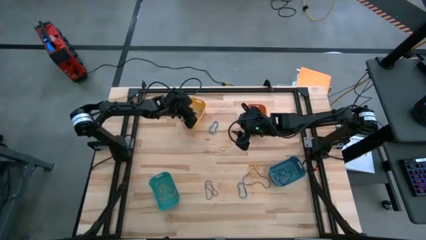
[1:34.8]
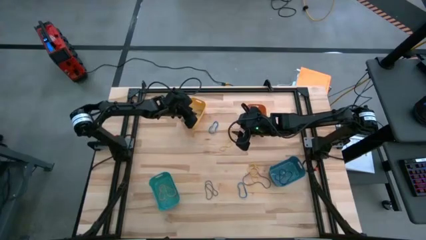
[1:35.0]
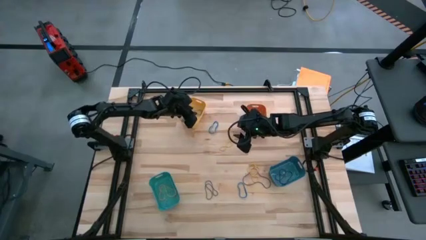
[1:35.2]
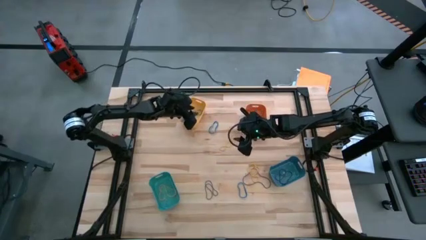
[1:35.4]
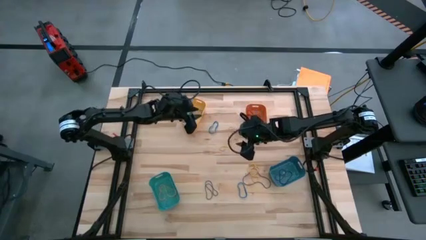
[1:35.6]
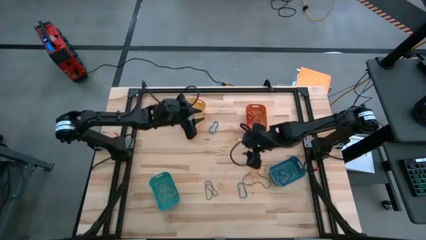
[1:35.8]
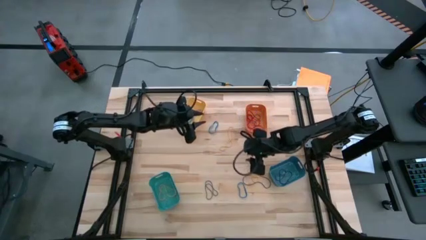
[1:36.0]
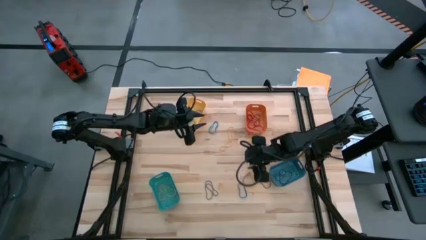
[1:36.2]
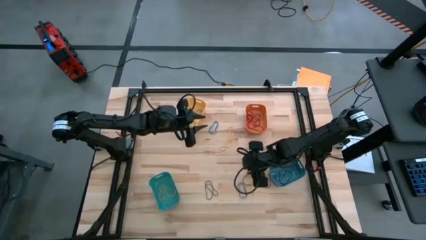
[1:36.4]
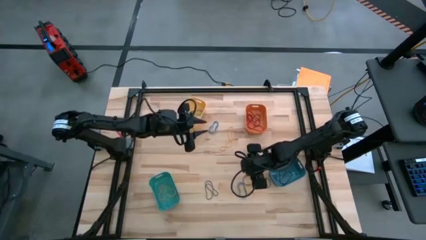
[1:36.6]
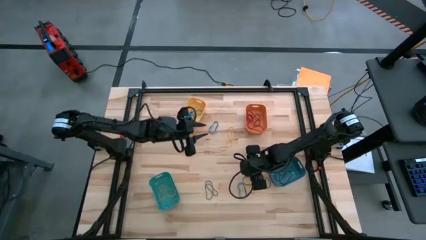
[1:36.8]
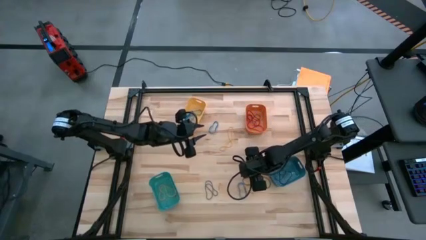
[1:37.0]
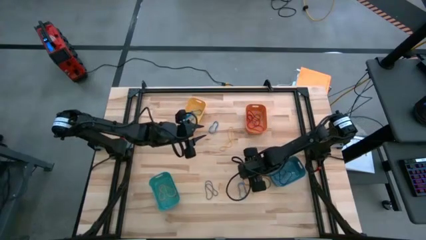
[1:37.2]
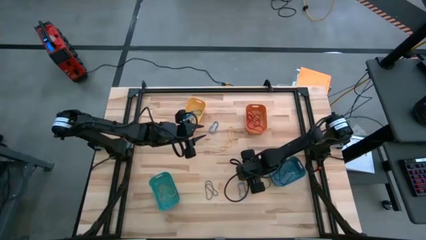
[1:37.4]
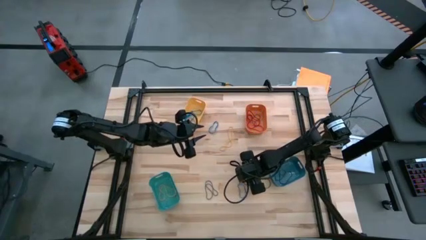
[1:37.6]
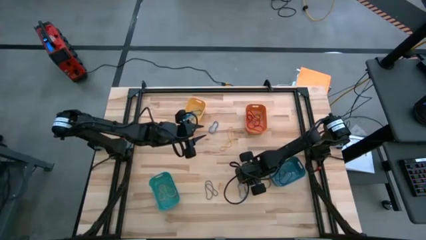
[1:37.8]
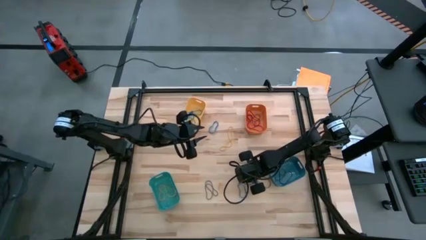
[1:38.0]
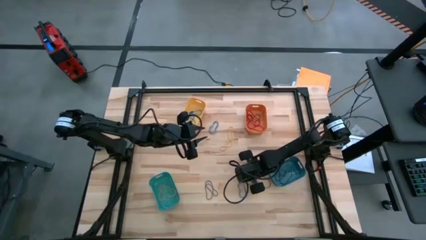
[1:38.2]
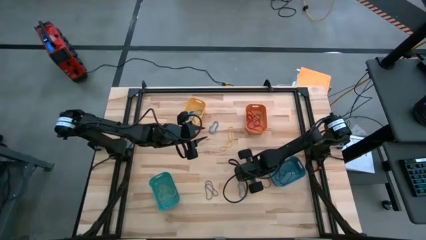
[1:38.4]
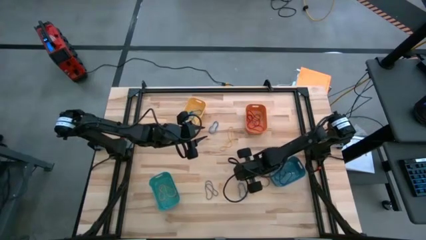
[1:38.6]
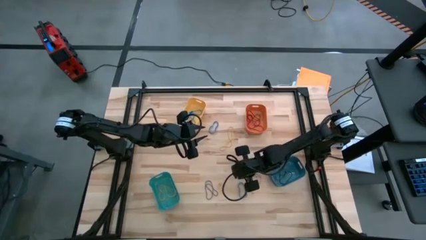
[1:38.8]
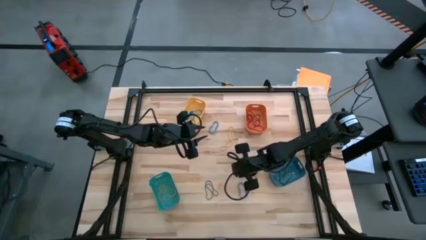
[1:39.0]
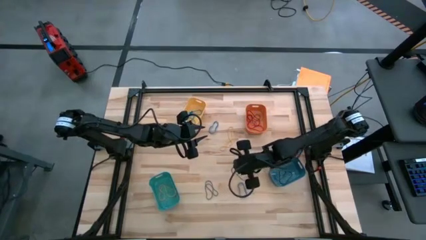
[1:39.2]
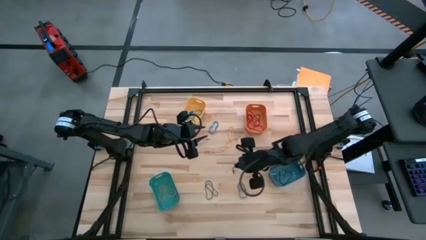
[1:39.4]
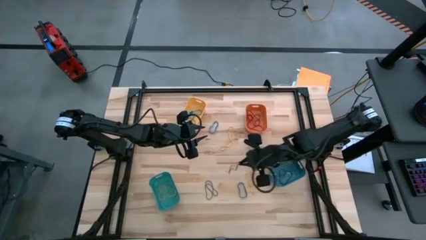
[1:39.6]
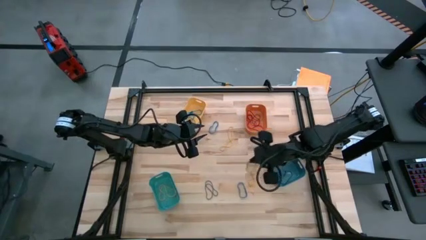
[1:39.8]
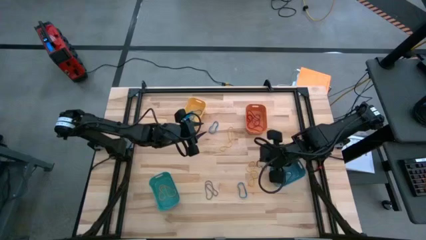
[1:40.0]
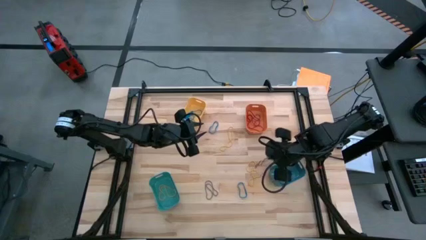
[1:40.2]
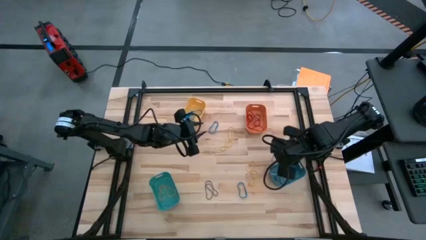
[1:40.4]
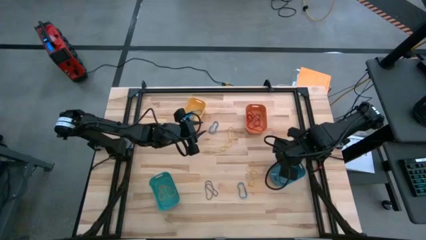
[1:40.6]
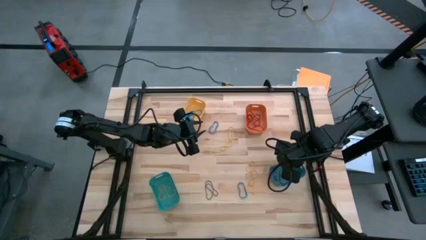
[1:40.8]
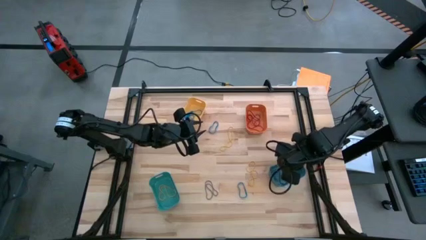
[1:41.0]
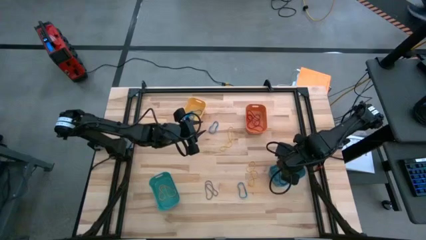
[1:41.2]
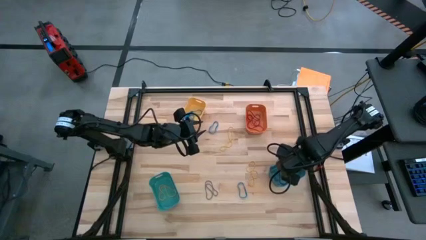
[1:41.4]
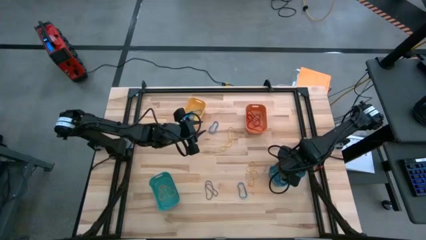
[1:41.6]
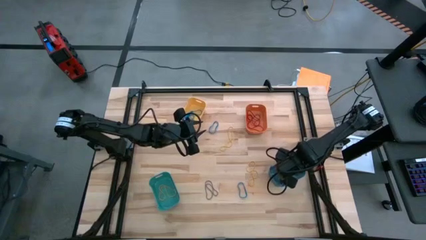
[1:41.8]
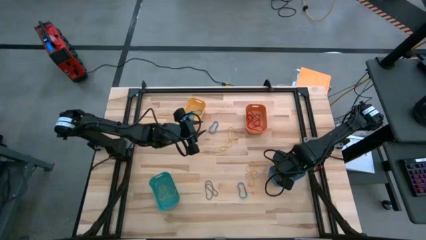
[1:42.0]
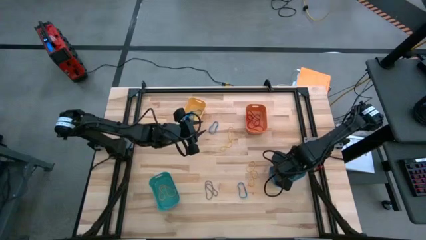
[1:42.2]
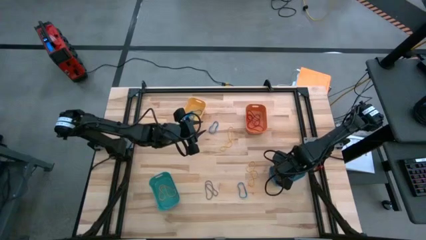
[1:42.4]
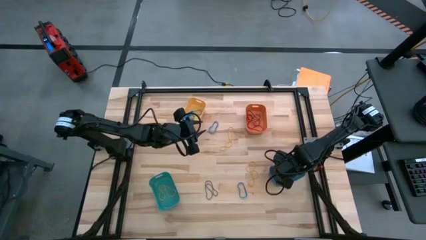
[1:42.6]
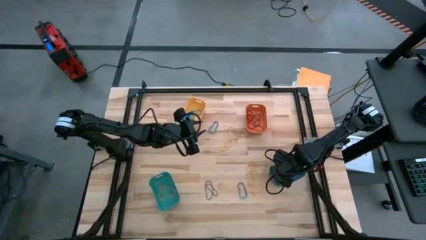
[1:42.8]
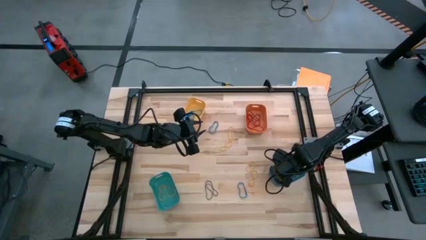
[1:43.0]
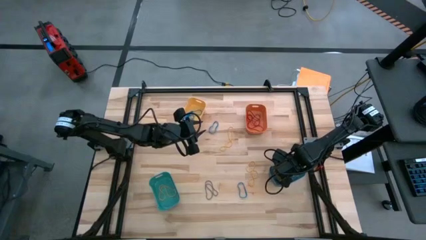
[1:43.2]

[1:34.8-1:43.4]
Task: Sort rubber bands into baskets
Put the violet rubber band into the blue bin

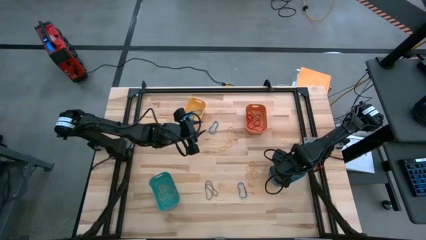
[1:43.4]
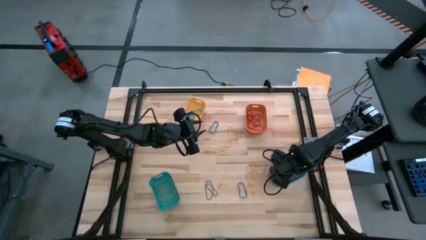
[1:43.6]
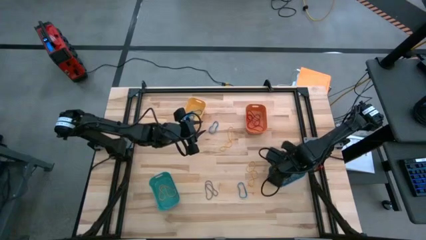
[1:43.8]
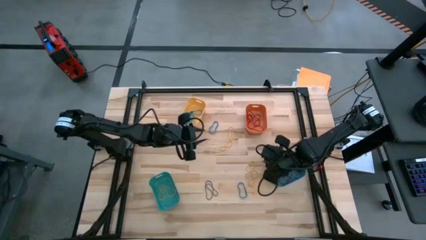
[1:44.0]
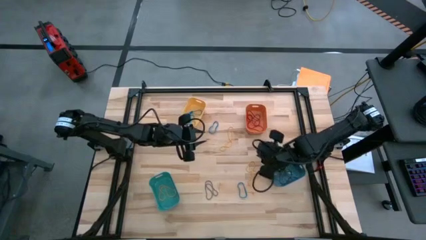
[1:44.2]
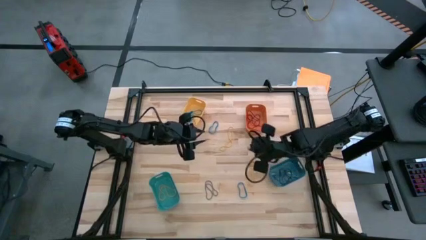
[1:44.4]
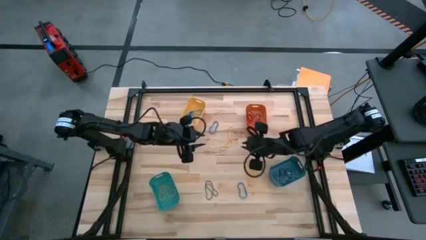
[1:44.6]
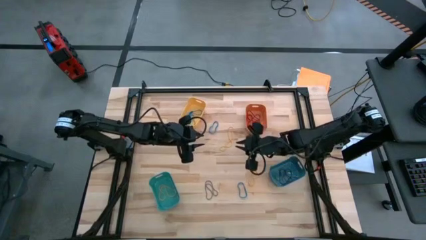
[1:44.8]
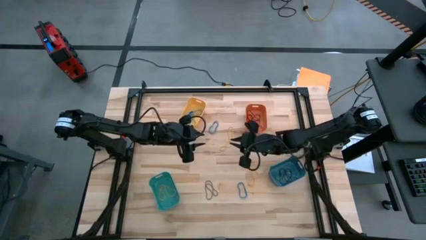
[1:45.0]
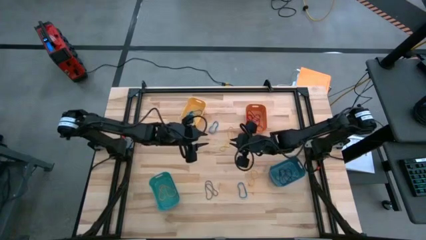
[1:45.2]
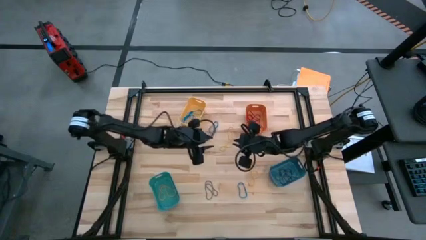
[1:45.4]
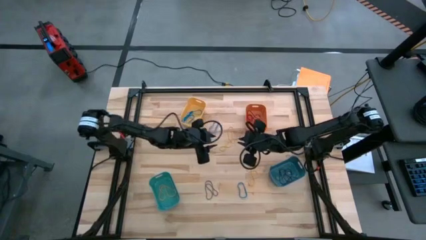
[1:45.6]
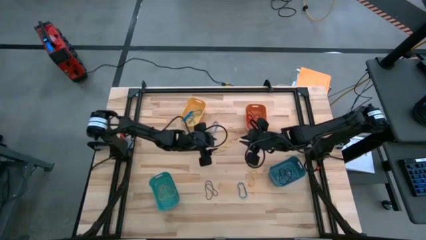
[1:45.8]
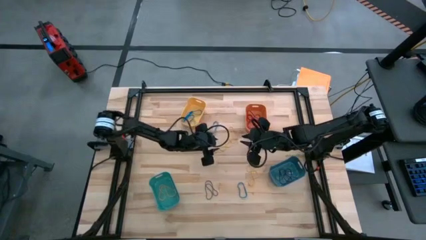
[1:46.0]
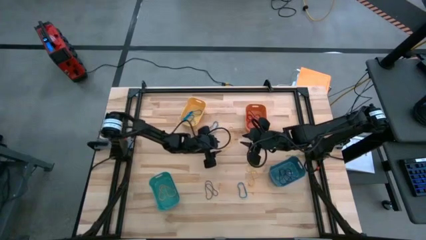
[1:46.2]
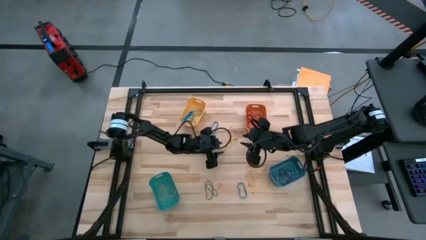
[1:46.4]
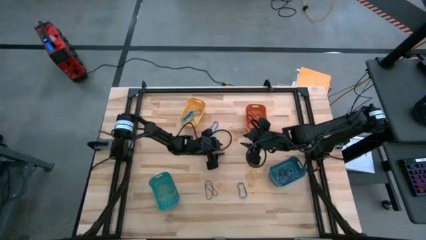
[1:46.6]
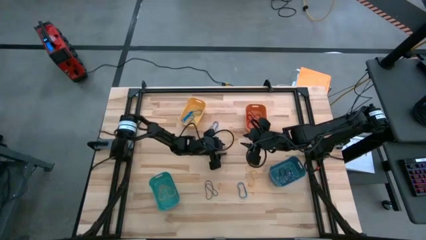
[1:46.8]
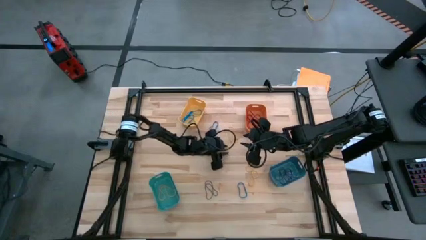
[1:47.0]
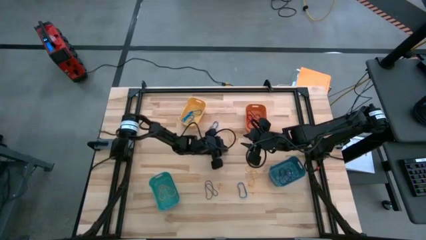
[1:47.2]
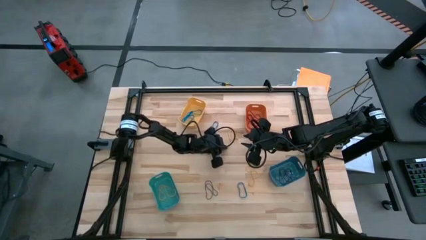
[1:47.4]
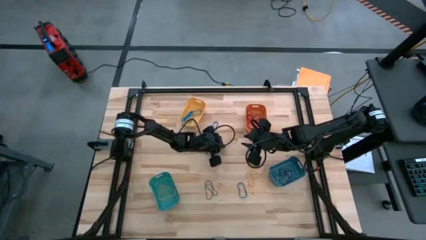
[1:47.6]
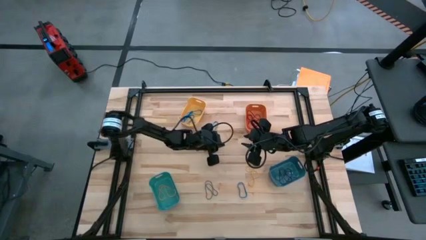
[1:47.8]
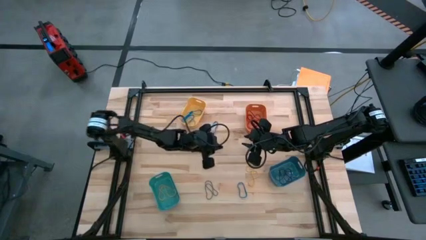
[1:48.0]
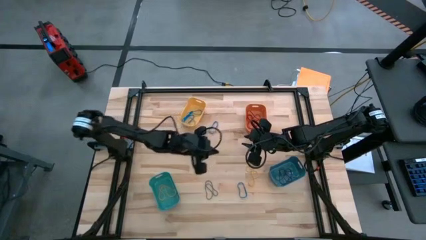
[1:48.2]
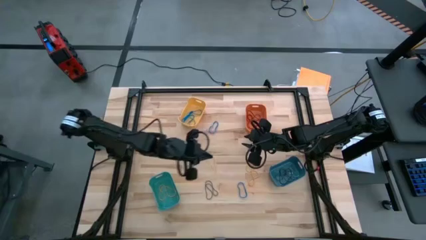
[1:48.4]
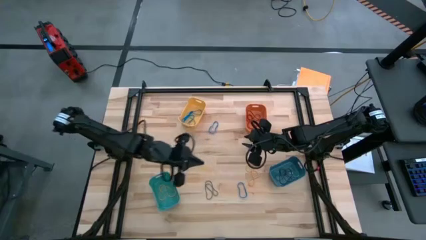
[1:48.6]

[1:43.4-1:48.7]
Put the yellow rubber band into the green bin
